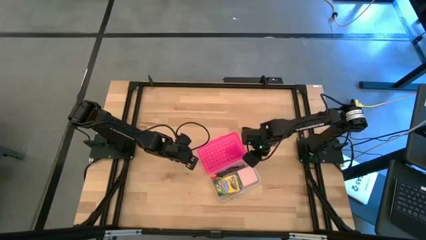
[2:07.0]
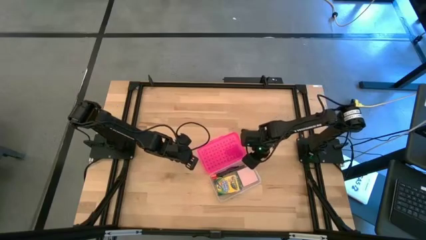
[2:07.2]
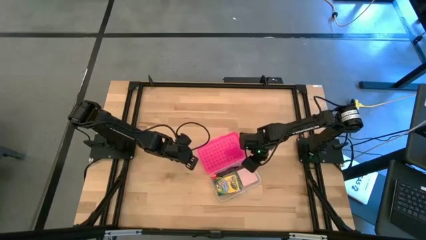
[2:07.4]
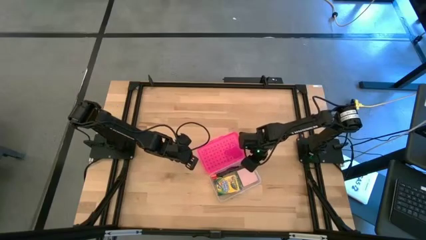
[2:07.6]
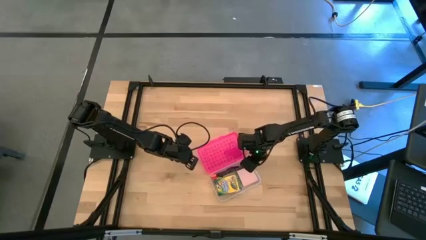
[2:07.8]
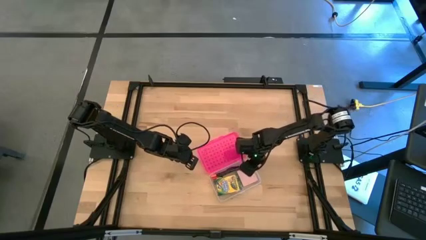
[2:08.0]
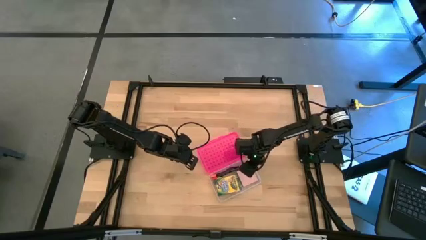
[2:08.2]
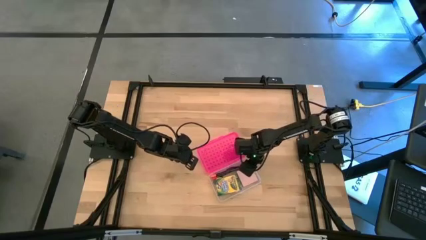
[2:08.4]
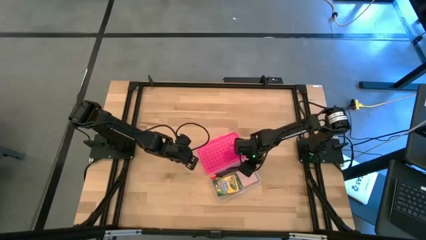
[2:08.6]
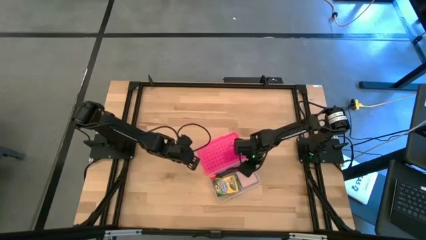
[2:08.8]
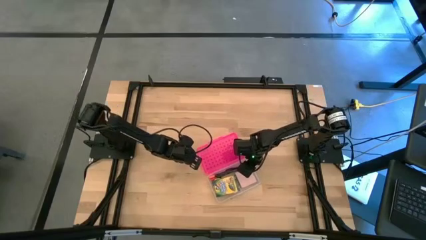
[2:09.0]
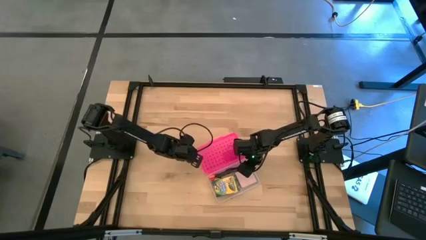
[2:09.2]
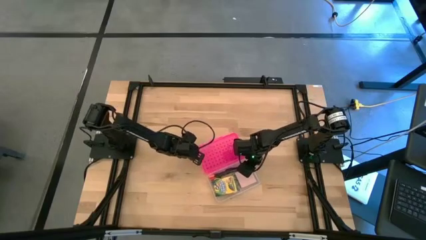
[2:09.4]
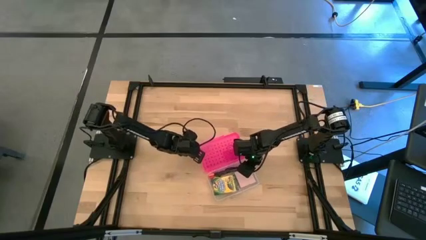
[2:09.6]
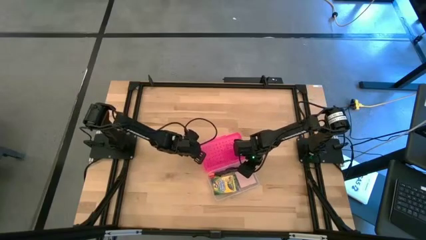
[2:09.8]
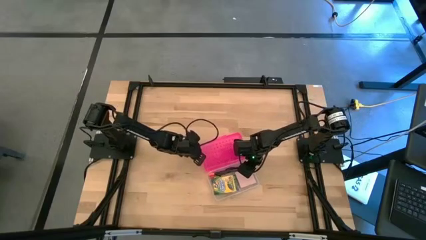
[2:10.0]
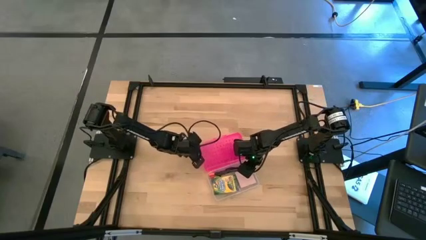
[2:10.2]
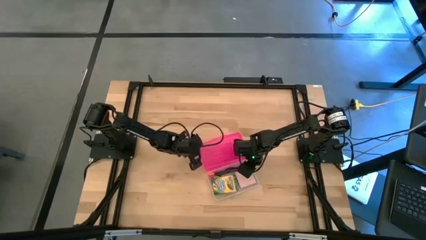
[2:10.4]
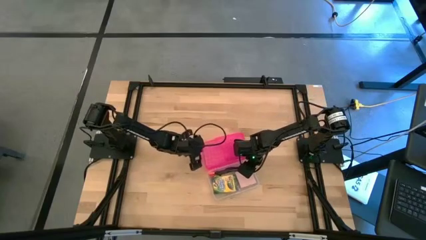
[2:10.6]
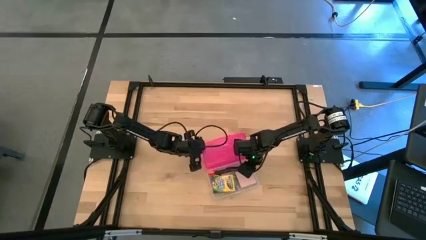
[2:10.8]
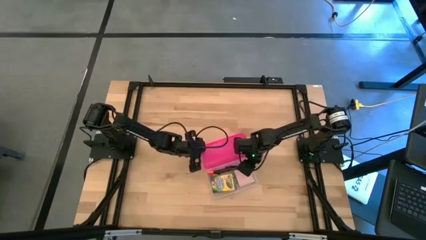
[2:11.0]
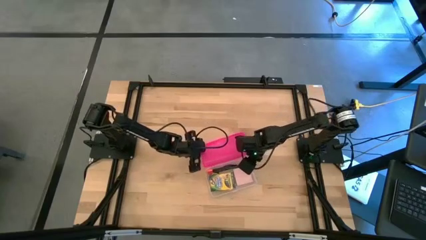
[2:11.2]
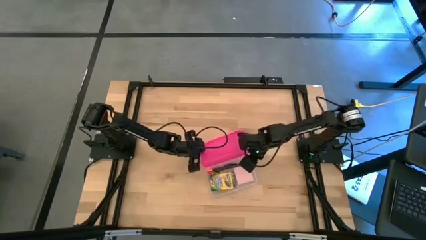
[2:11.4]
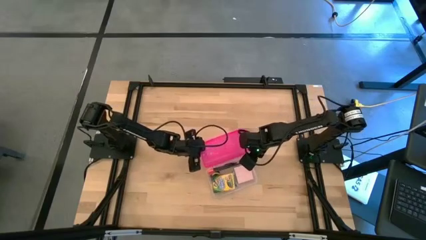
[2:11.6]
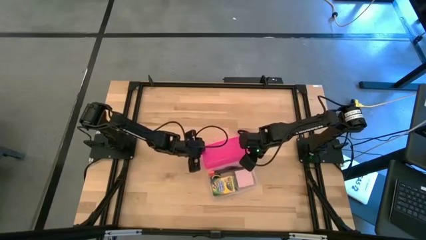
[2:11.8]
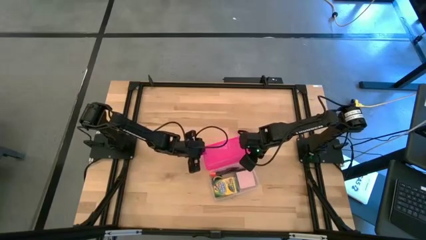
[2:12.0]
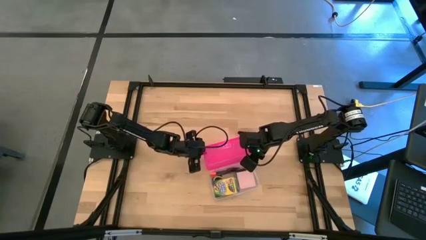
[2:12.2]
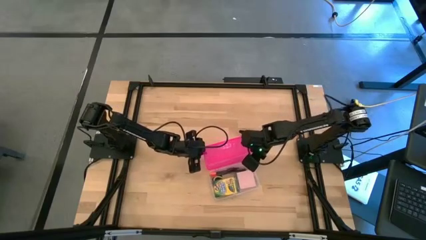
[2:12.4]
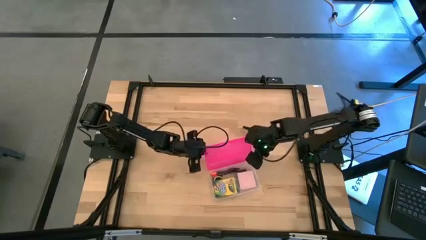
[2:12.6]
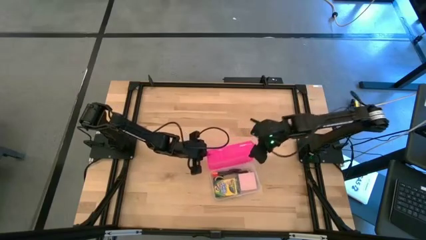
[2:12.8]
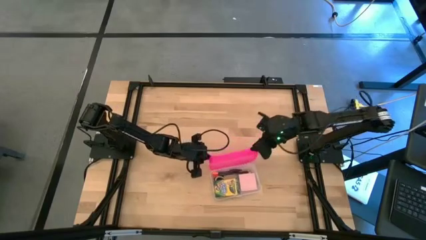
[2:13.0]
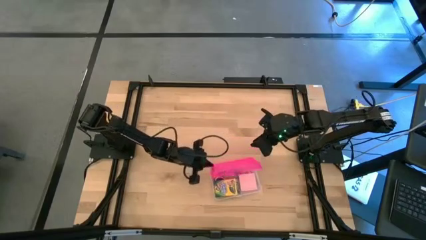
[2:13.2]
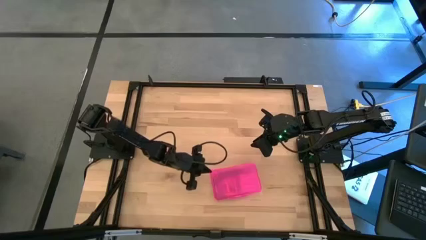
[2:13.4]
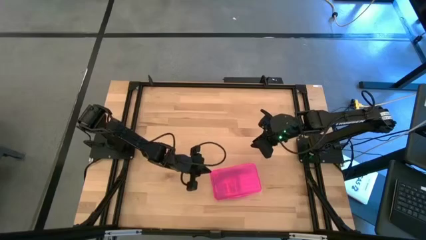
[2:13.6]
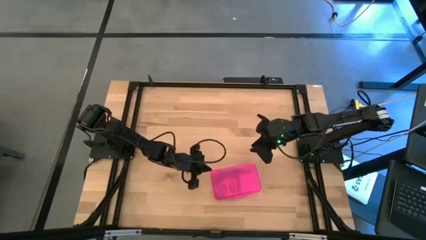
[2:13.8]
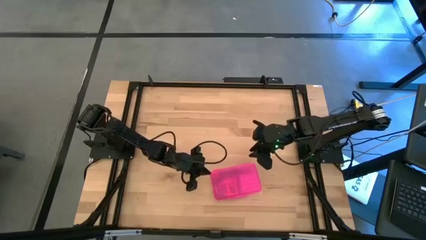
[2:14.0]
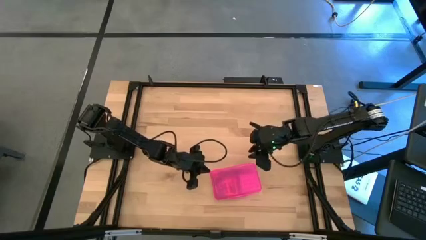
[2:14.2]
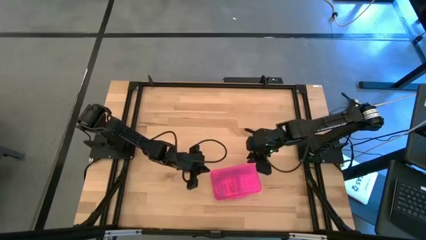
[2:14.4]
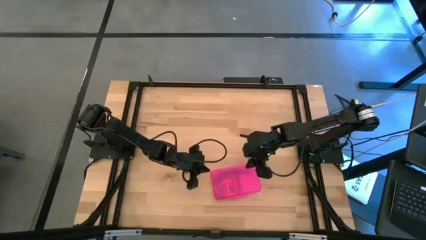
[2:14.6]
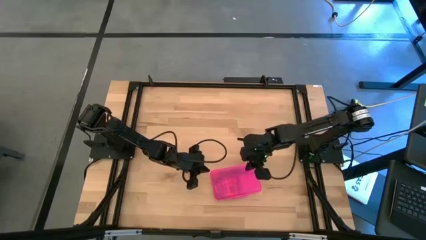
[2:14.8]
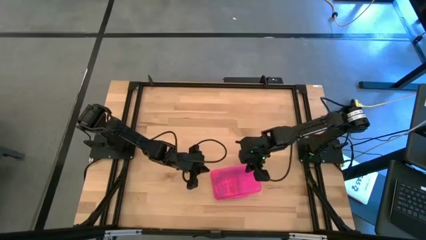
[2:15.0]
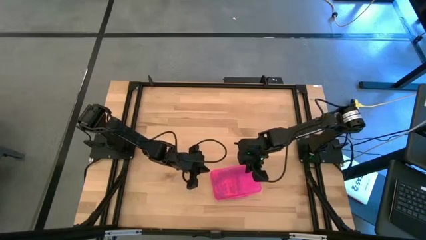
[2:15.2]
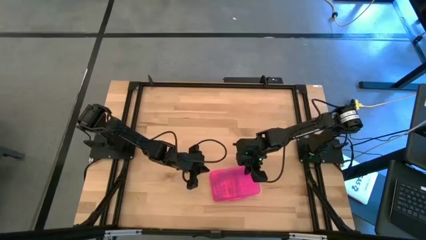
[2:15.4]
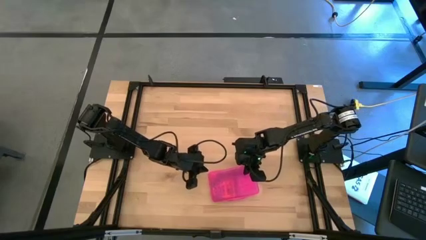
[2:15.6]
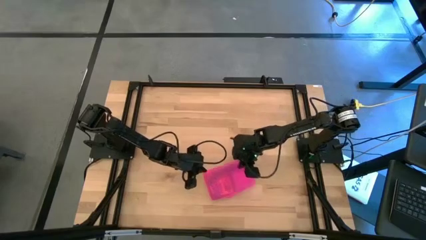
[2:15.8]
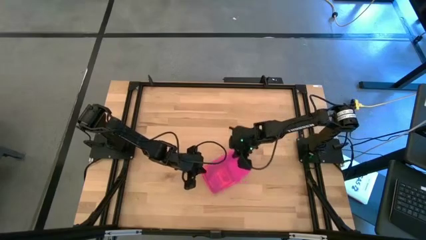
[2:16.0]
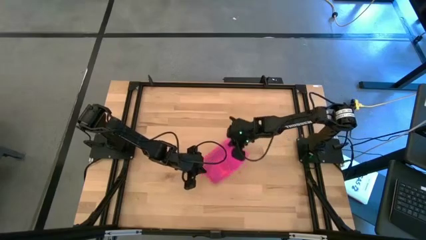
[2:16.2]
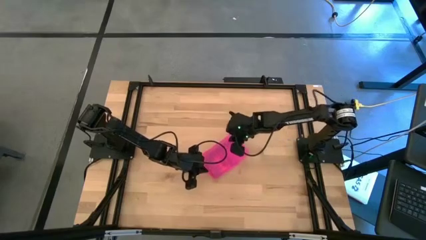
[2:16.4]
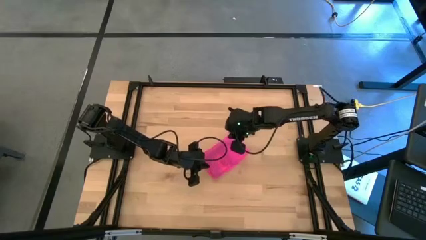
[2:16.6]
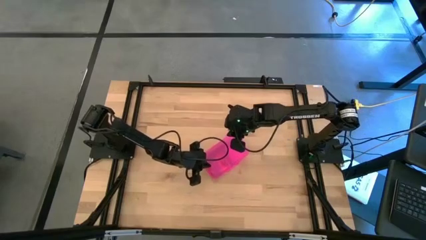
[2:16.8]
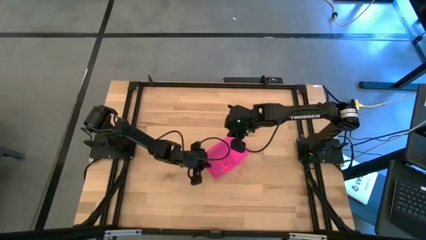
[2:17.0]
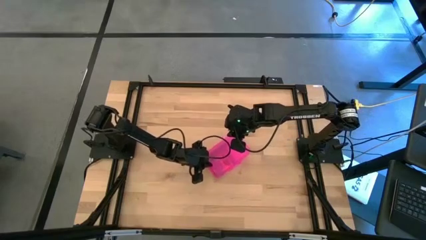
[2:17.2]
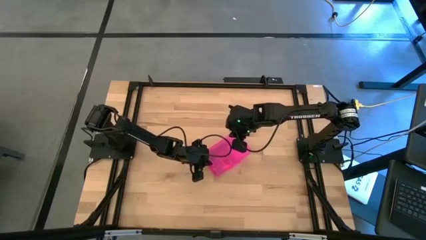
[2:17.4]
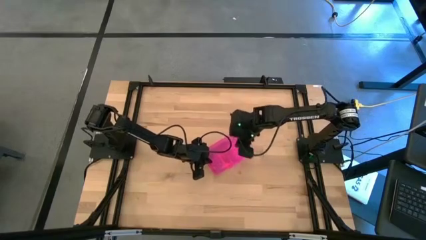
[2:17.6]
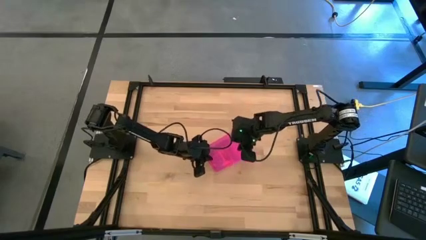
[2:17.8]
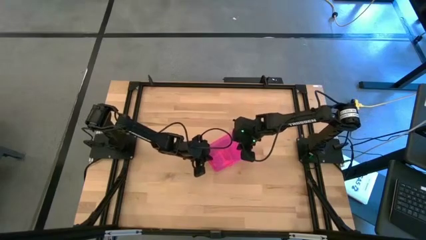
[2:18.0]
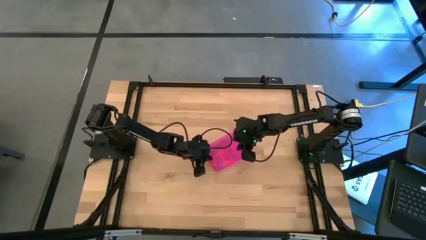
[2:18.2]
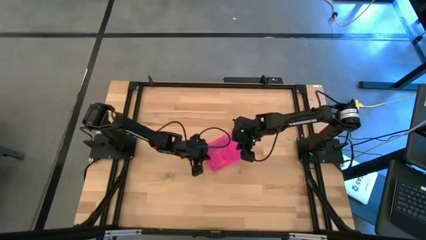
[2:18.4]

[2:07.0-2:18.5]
Task: Pack school essentials
Close the pink box

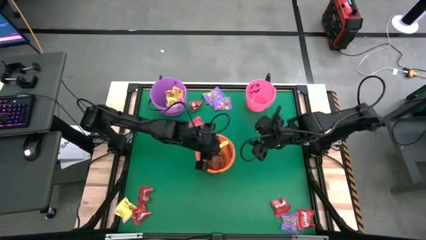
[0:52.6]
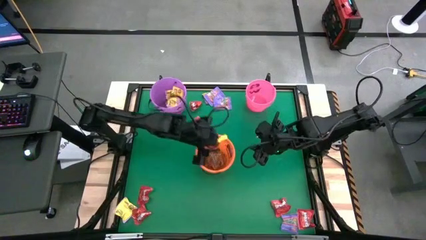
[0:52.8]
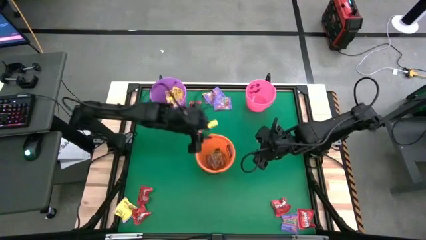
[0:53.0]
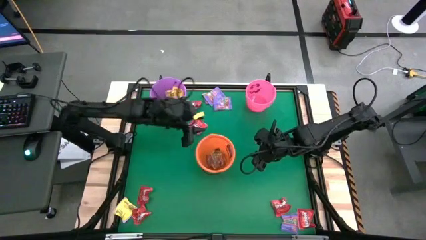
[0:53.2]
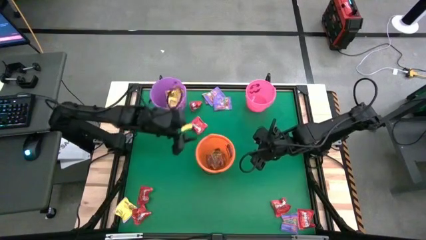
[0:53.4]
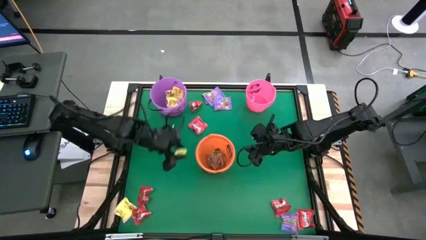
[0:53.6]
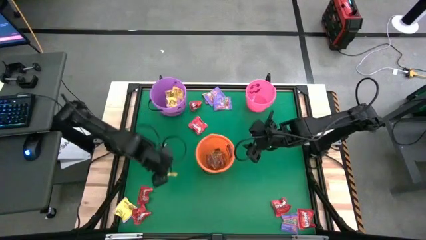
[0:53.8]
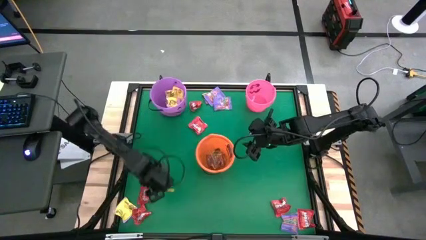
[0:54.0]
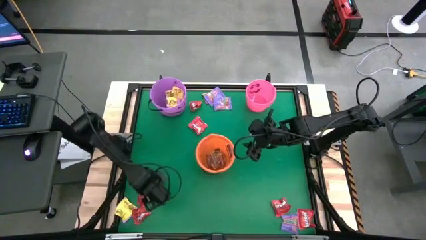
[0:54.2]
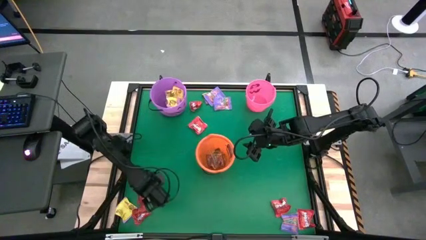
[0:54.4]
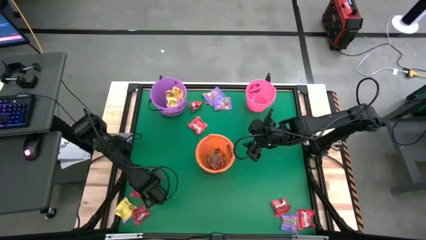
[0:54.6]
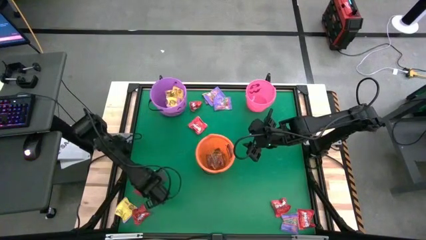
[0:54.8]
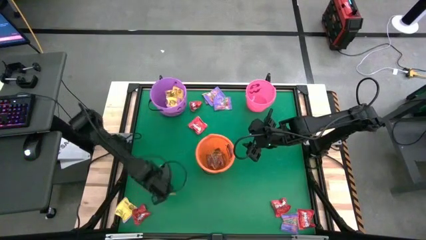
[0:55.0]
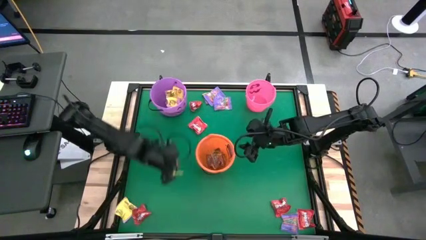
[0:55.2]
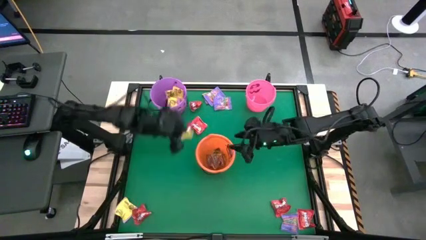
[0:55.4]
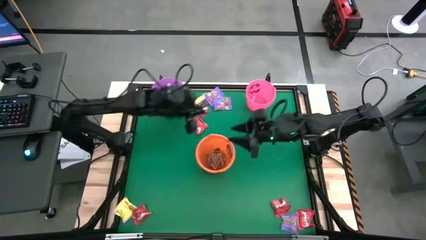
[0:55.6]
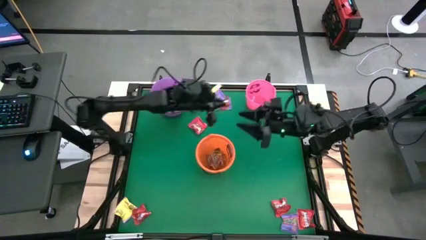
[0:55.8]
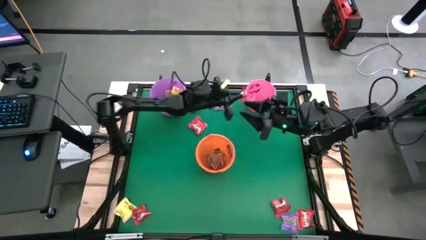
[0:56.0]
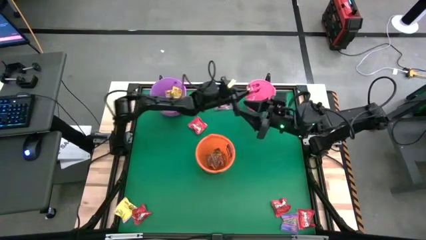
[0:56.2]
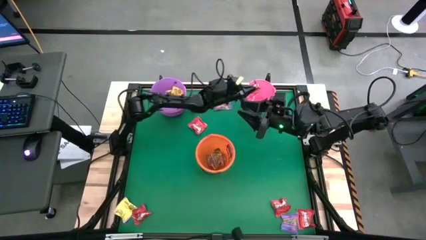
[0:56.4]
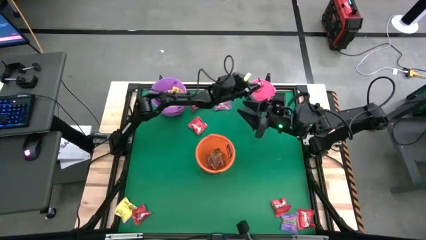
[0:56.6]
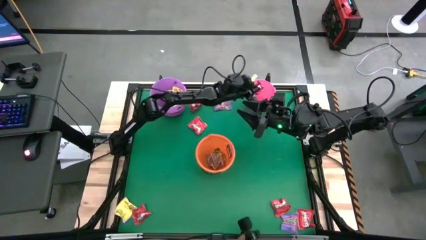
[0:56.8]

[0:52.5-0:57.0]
Task: Sort candy by brand, put in halloween buckets
Put the red candy into the pink bucket

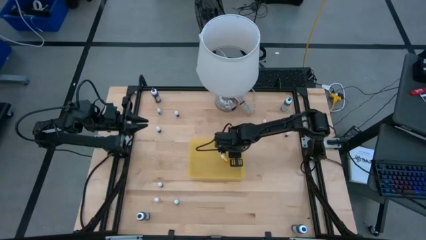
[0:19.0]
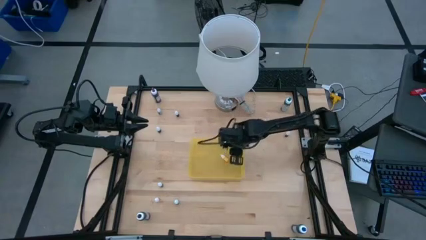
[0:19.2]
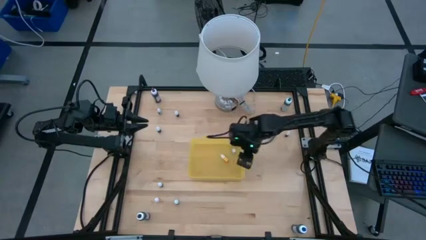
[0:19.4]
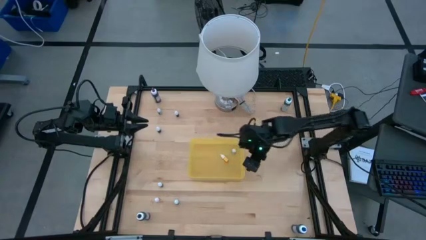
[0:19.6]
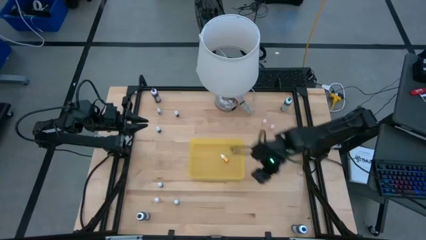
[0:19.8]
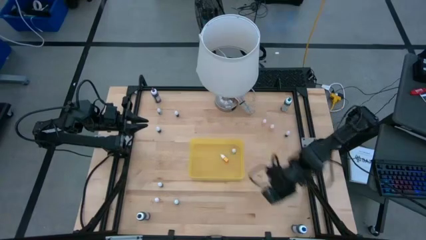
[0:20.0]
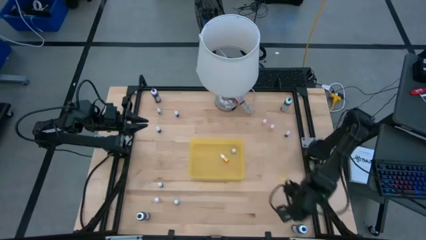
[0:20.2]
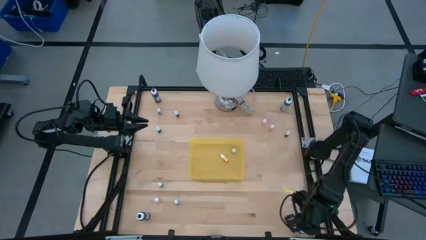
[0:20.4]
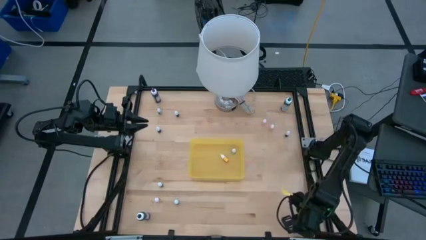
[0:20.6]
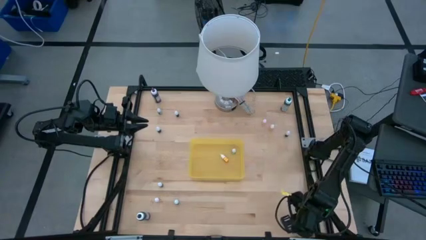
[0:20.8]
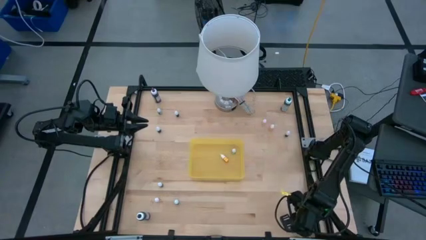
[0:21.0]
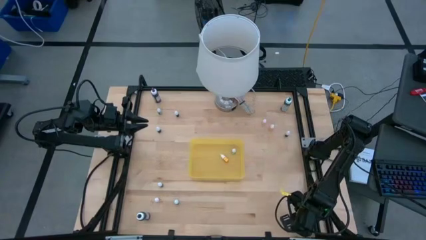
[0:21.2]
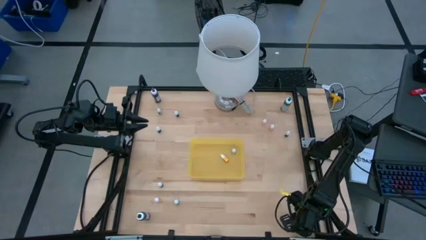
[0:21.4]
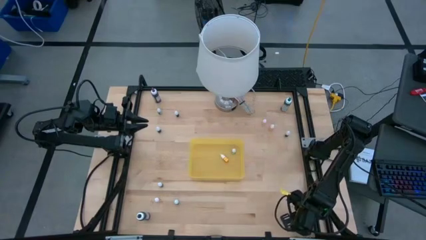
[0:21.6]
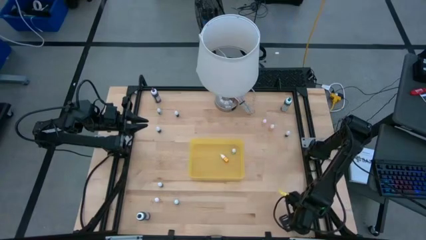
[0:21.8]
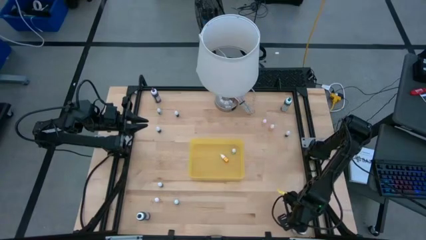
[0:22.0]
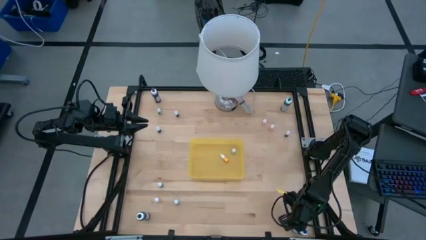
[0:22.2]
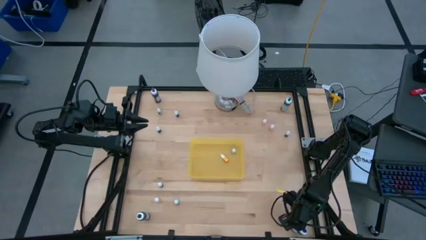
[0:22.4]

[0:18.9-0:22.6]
Task: Pick & Place food coloring
Put the blue food coloring bottle into the yellow bin
